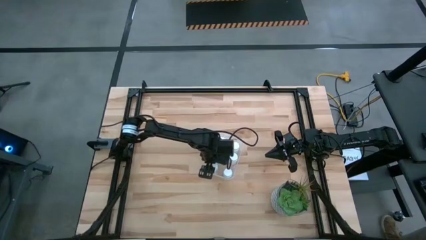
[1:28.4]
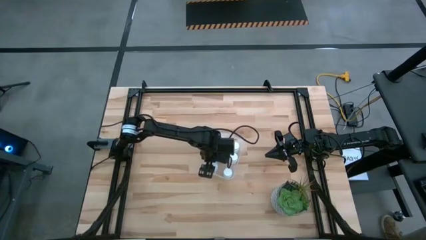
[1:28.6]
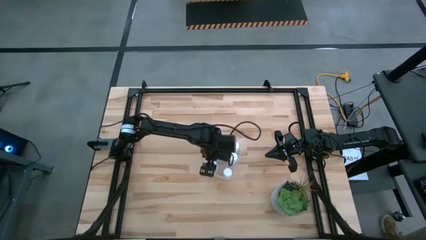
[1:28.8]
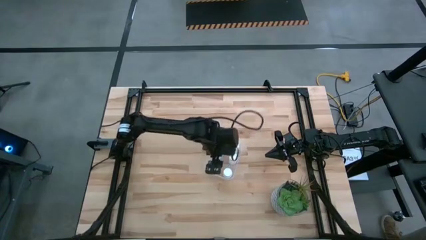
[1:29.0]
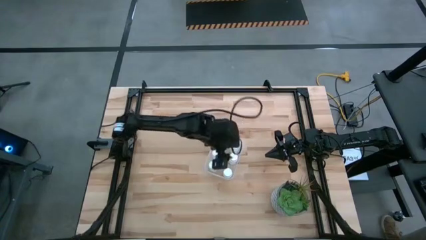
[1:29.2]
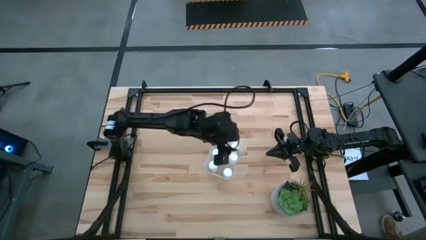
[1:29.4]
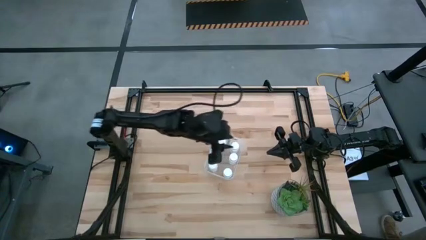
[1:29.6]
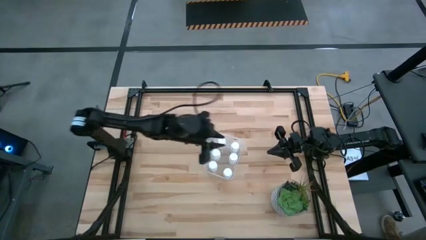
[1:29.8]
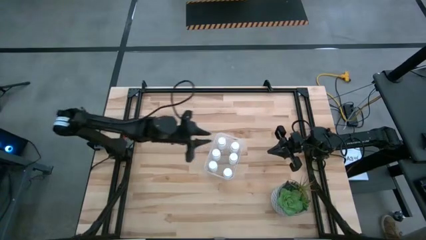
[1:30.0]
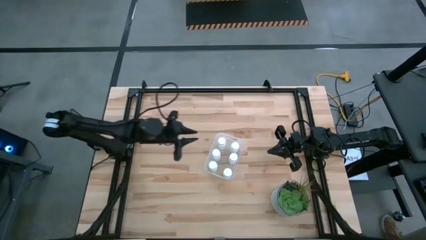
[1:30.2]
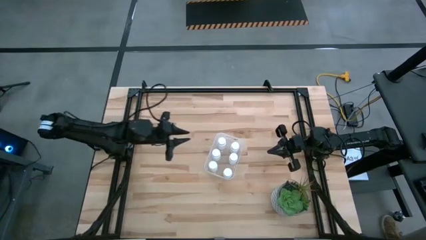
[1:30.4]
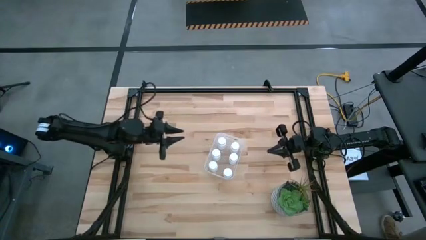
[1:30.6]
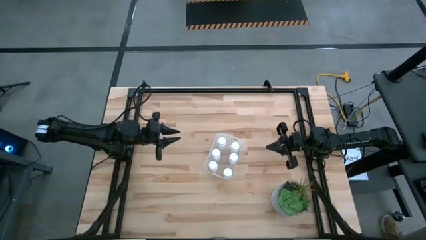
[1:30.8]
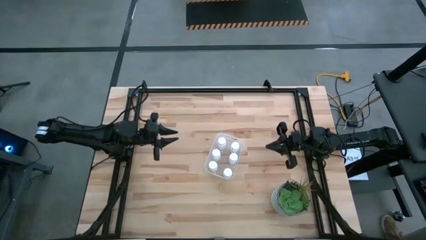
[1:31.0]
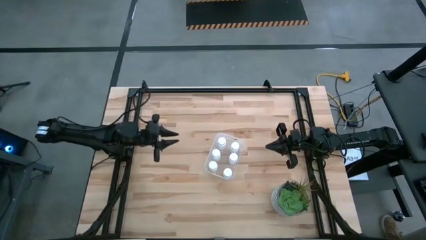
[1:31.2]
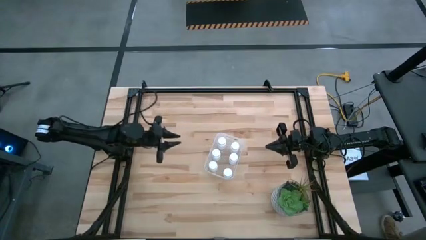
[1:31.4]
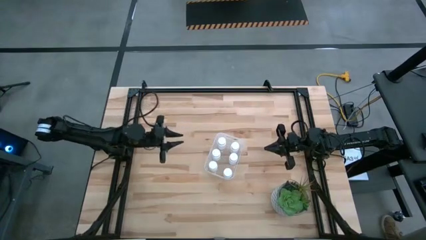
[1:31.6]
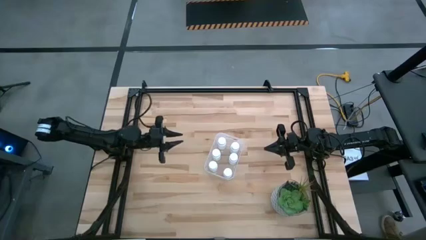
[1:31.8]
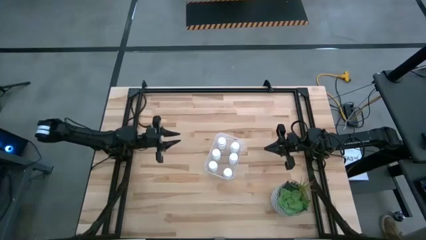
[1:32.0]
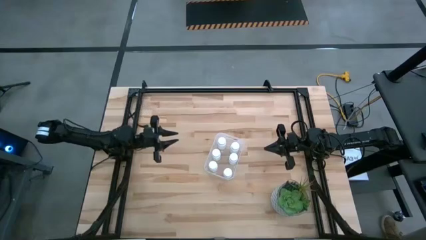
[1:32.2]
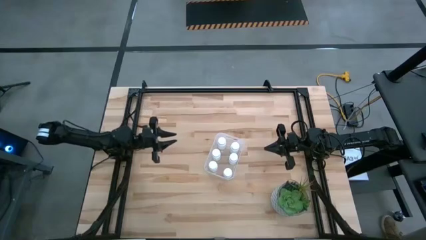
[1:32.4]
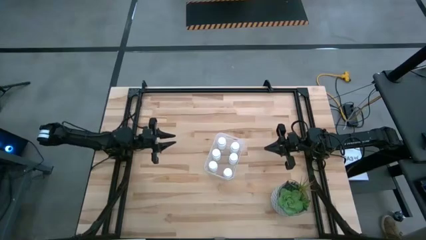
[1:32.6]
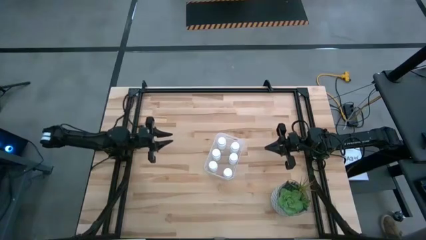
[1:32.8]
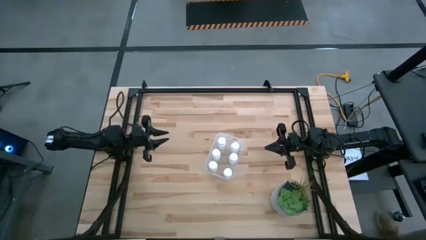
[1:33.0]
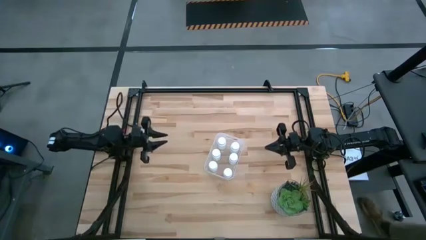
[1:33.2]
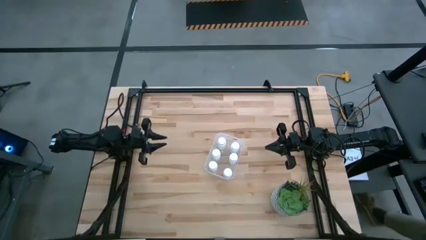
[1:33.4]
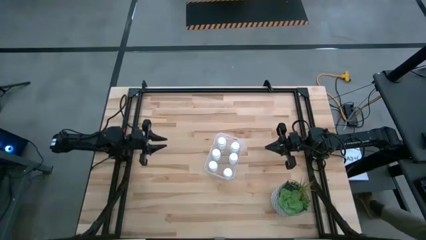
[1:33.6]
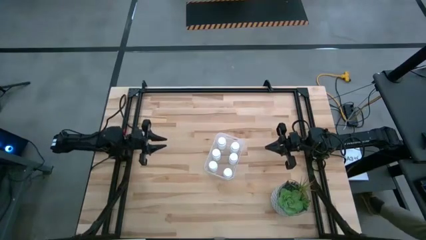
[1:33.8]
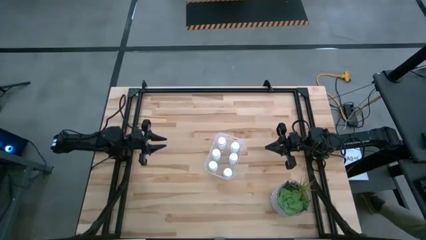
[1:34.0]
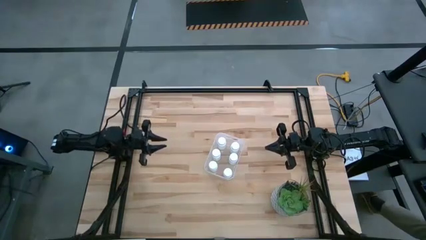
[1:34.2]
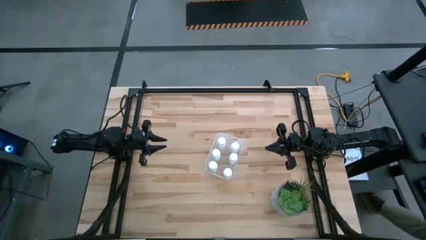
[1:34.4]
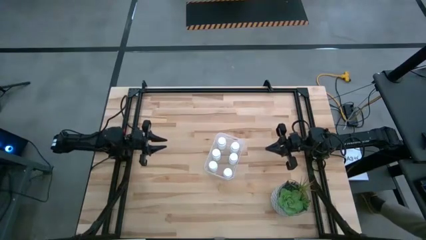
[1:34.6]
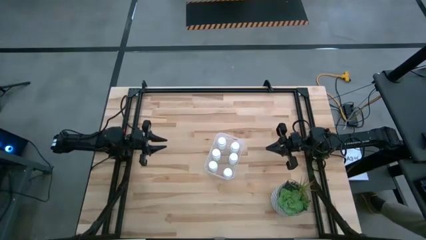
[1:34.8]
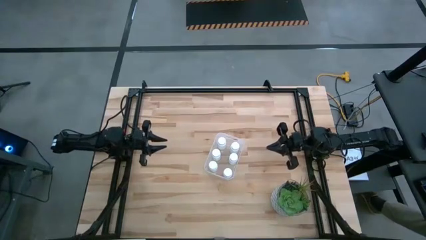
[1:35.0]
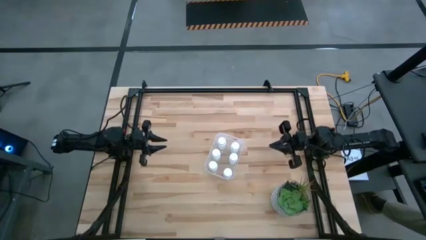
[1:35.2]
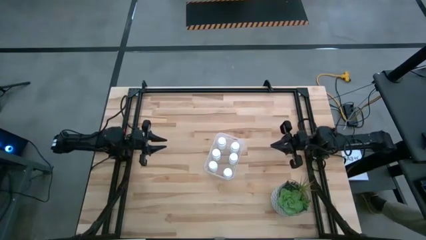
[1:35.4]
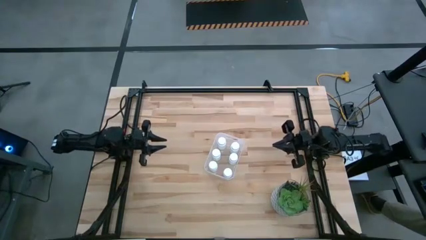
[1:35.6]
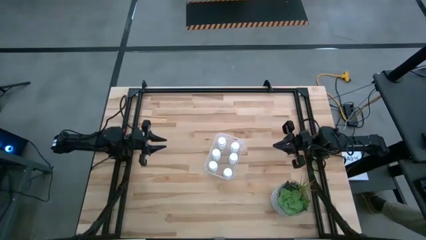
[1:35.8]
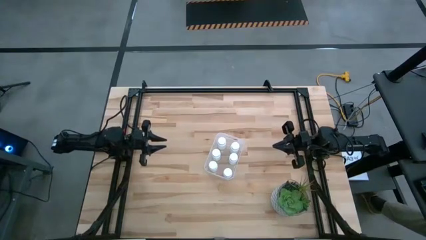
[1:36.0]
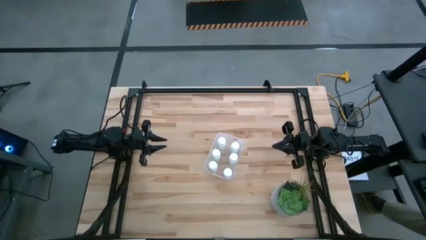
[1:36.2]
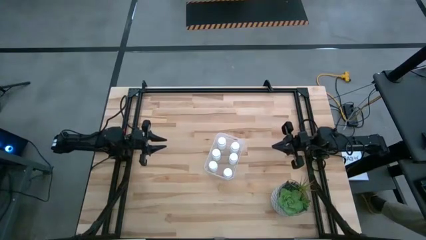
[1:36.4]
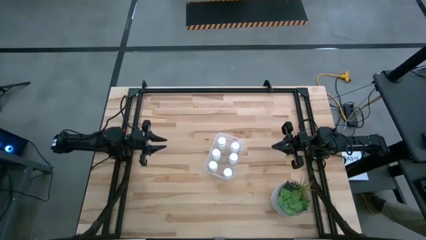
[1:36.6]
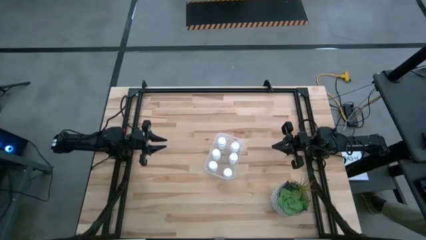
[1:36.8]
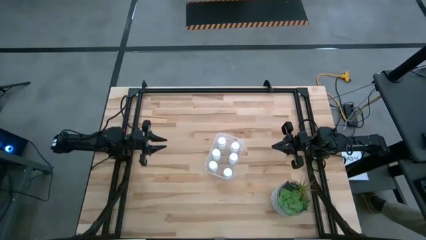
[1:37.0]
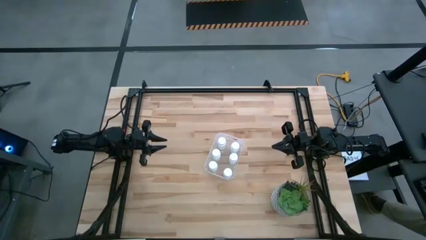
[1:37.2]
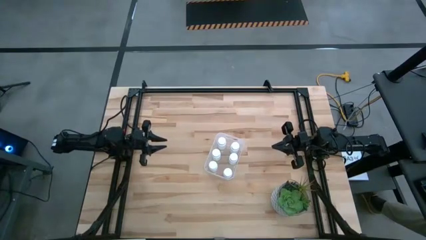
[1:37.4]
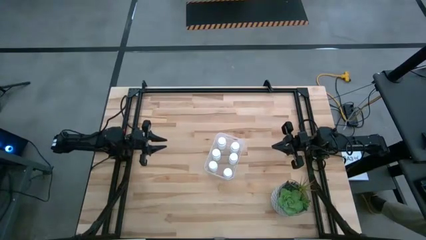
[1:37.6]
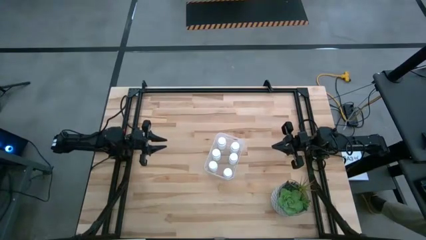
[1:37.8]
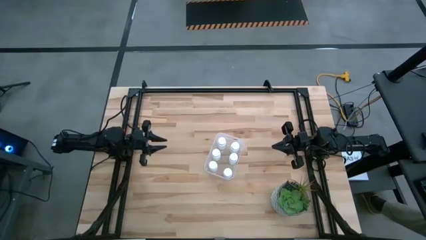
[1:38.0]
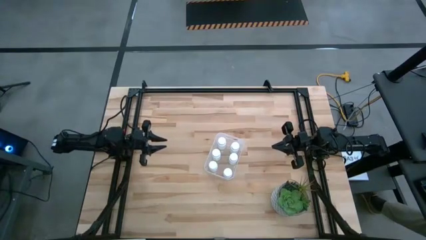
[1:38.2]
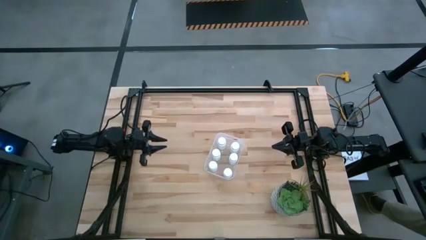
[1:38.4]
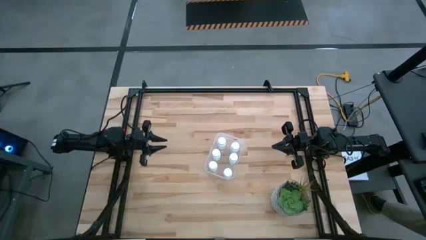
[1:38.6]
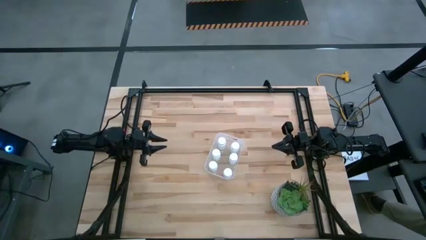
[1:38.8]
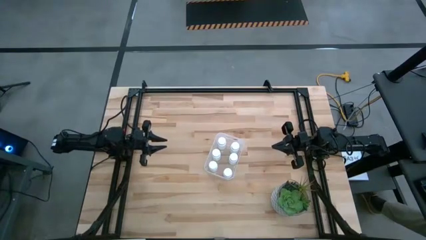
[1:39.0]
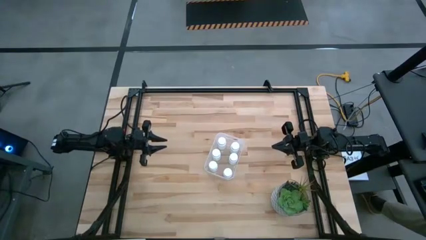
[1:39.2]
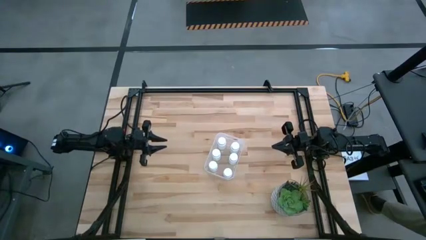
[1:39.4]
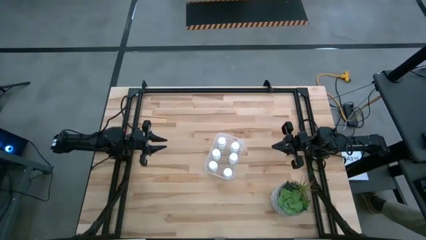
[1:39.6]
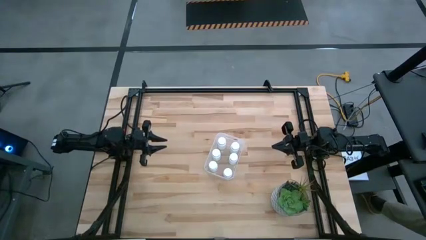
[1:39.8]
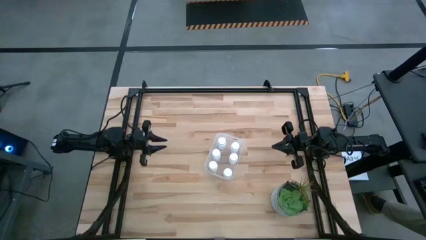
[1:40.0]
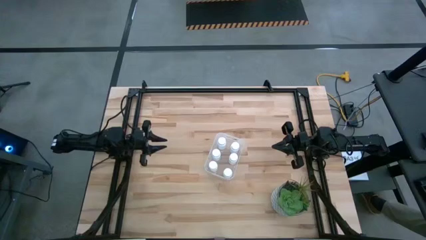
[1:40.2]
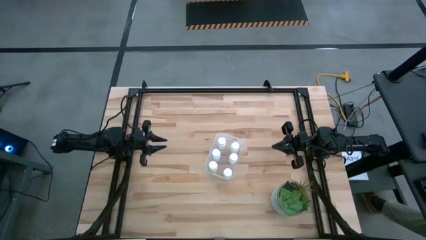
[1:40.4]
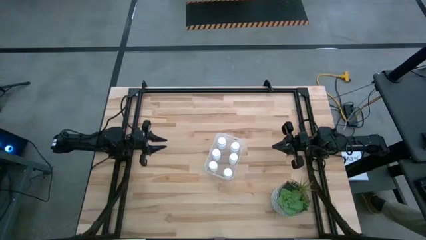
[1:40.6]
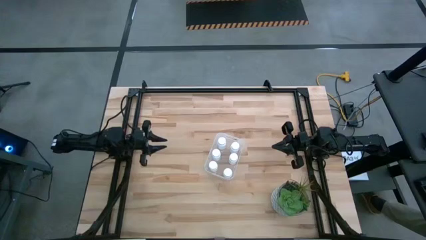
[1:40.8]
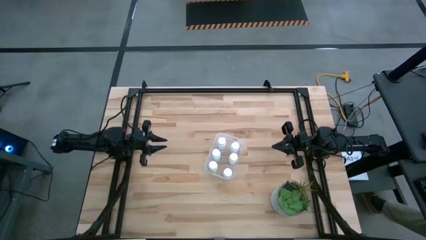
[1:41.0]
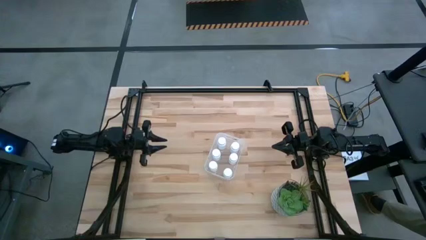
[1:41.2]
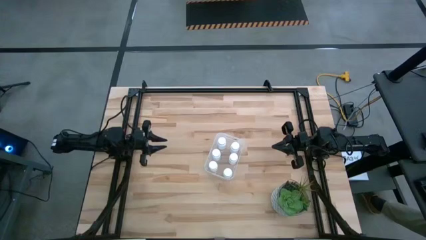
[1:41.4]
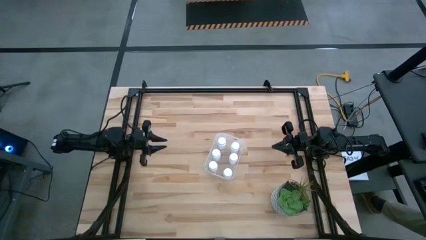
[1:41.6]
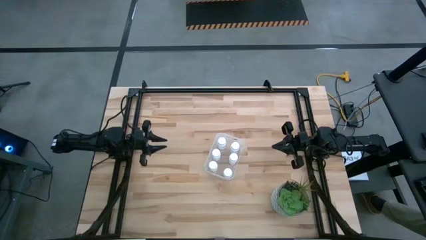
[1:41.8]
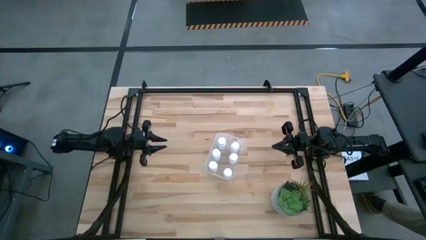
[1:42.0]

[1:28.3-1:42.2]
Task: Pick and place pill bottles into a basket
Return to Home Position

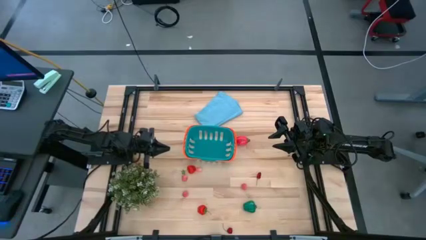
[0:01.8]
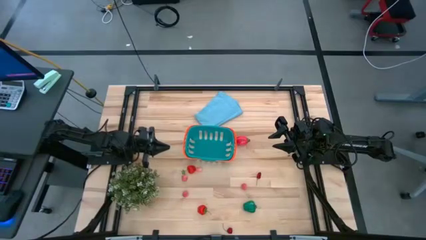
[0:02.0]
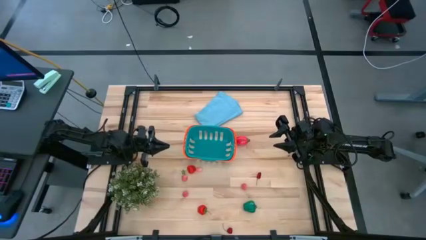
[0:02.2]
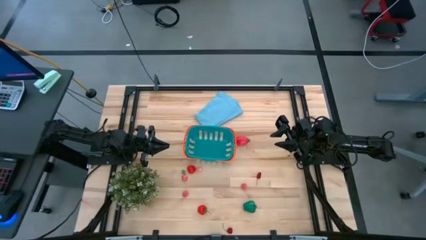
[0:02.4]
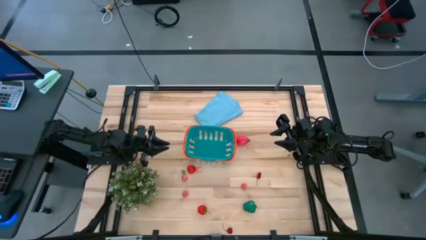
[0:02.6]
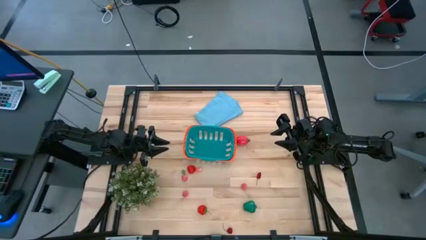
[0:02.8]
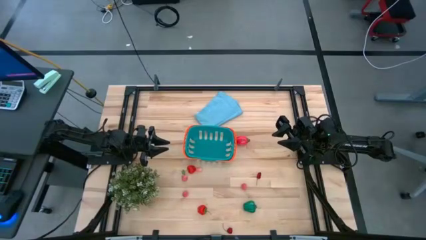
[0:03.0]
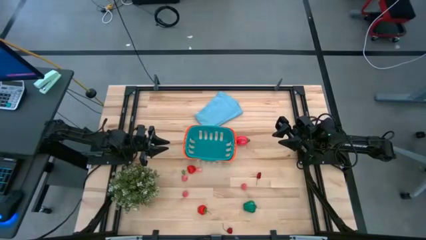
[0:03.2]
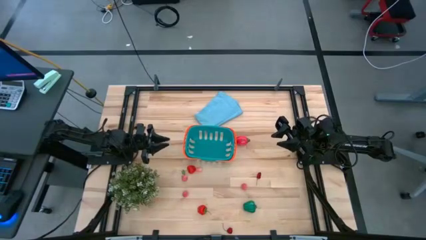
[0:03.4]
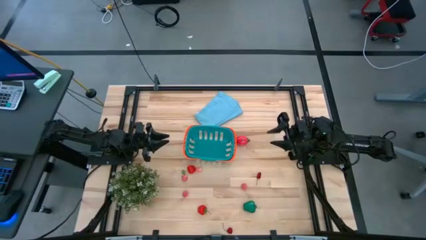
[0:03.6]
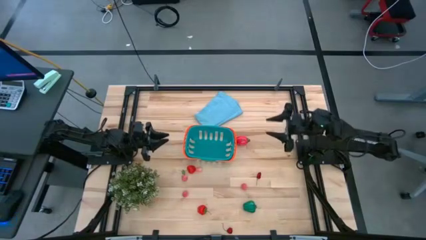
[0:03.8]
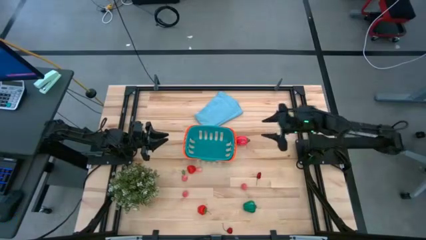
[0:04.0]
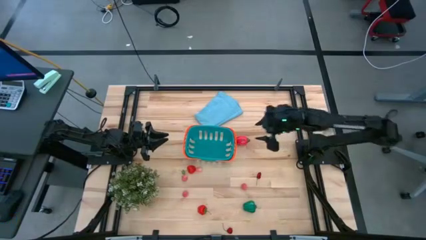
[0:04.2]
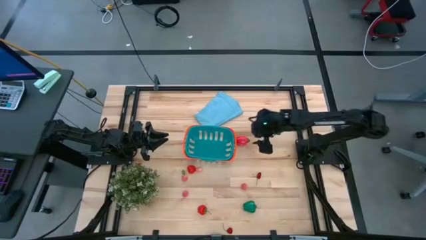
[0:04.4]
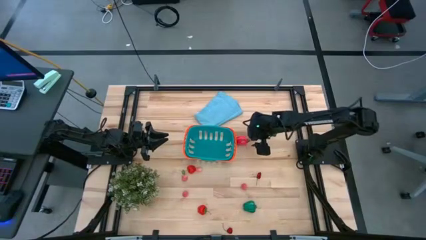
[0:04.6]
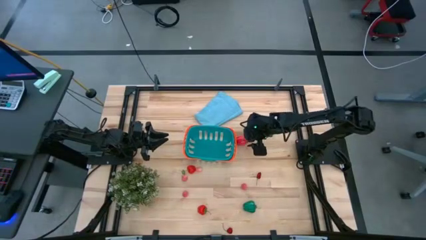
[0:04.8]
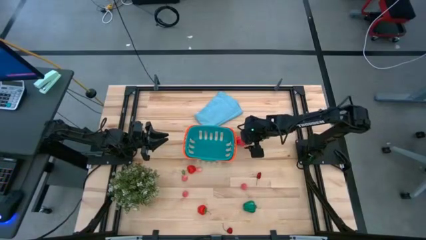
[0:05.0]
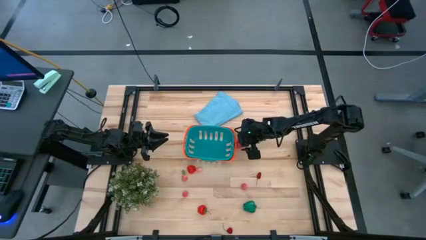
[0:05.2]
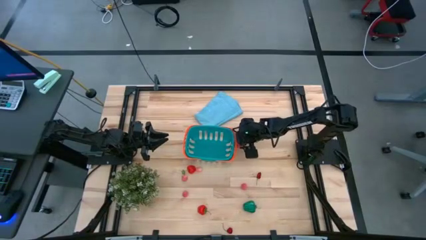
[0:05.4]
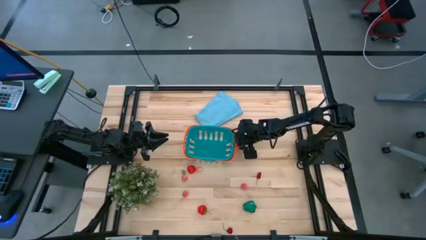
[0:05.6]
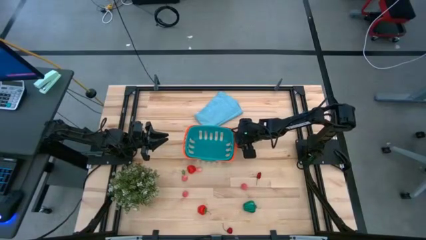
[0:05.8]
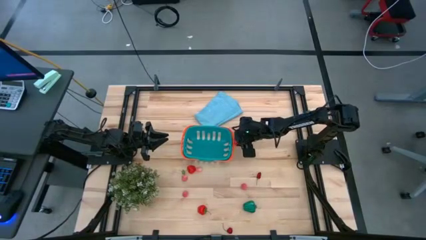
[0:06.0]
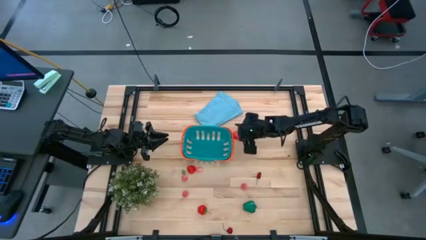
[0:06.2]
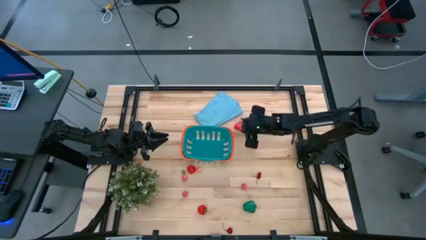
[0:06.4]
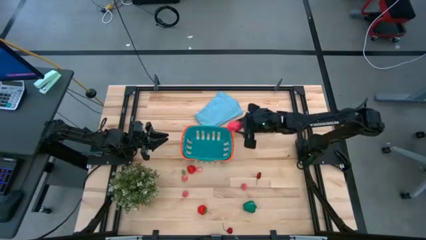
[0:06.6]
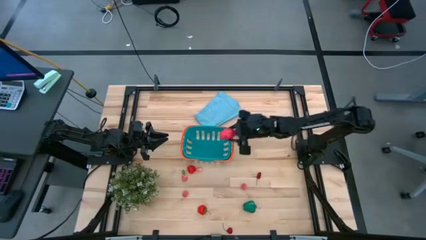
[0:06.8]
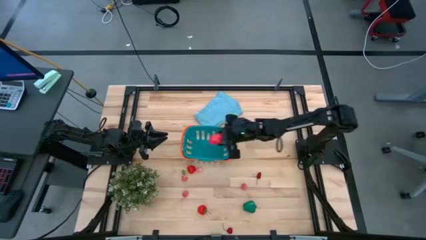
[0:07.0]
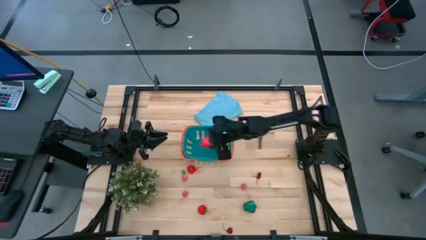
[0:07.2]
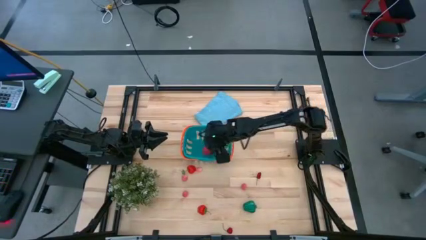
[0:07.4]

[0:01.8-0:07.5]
Task: Pick and placing Produce into tupperware
Put the red dragon fruit into the bin
